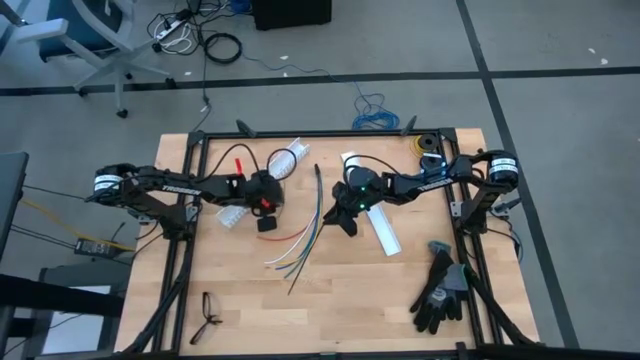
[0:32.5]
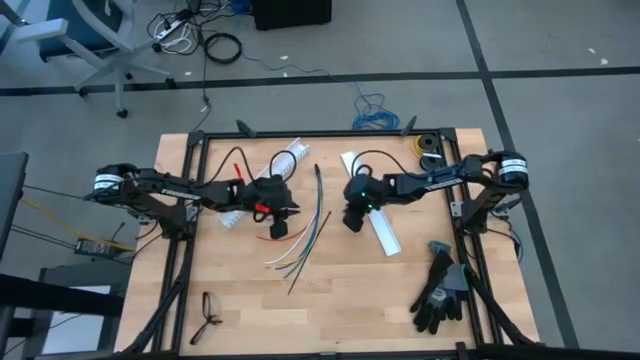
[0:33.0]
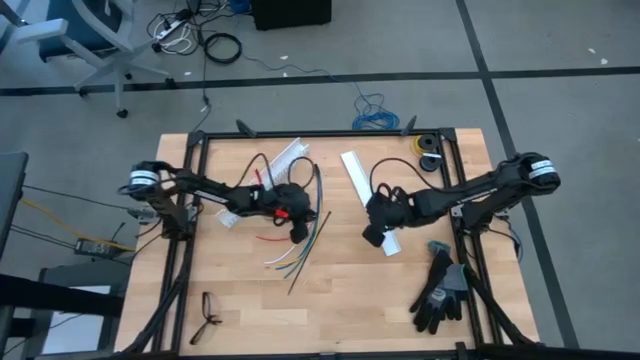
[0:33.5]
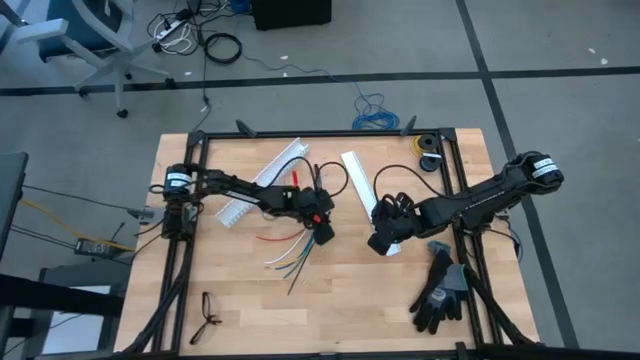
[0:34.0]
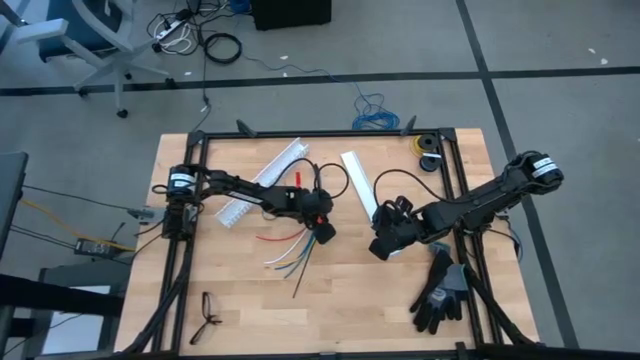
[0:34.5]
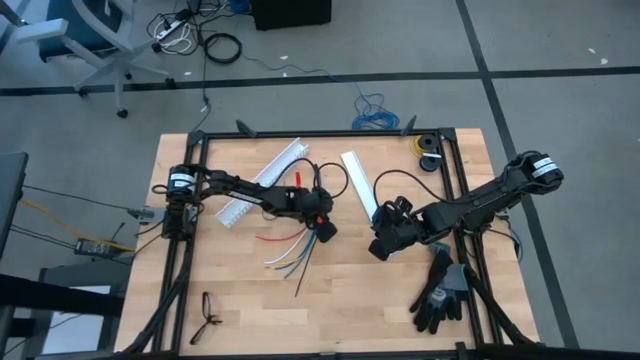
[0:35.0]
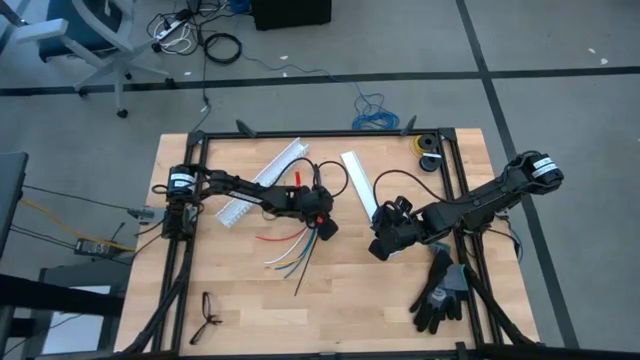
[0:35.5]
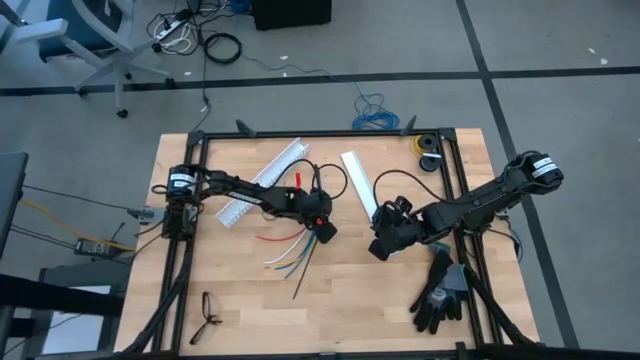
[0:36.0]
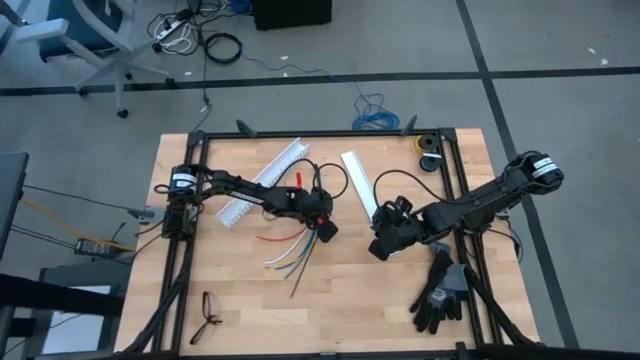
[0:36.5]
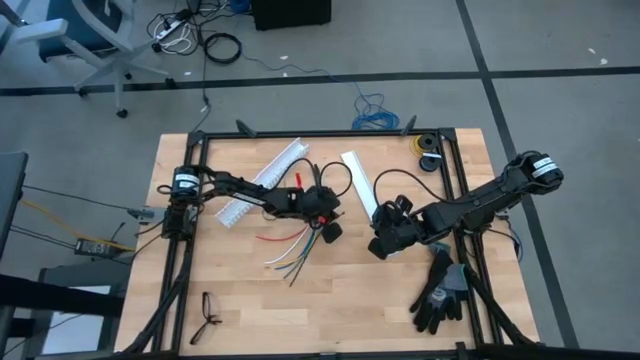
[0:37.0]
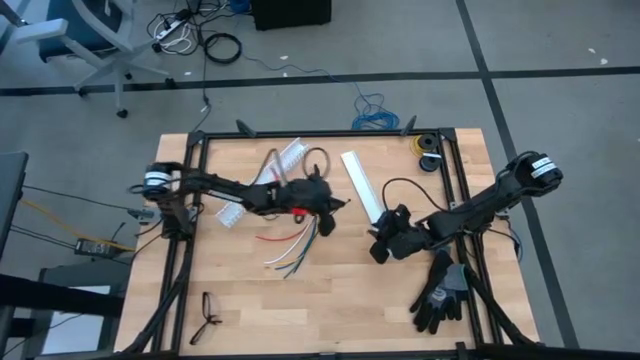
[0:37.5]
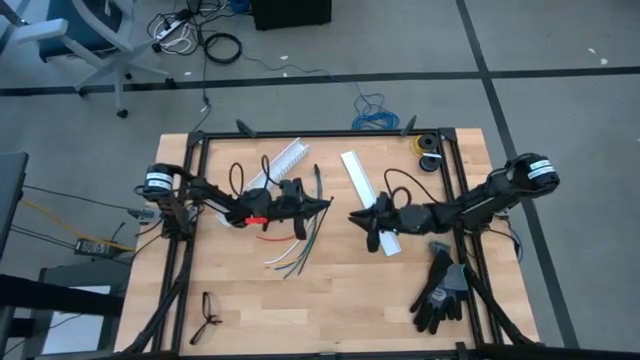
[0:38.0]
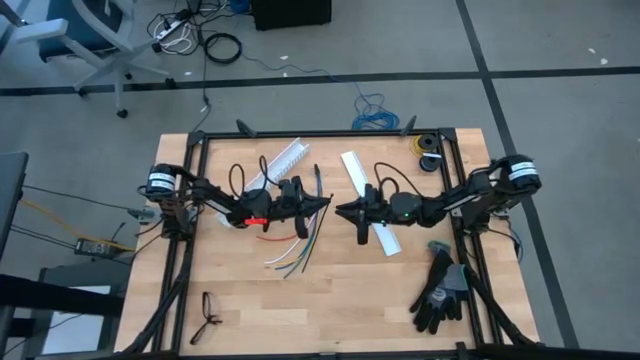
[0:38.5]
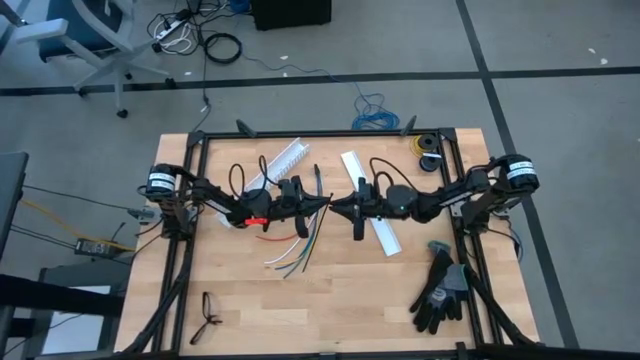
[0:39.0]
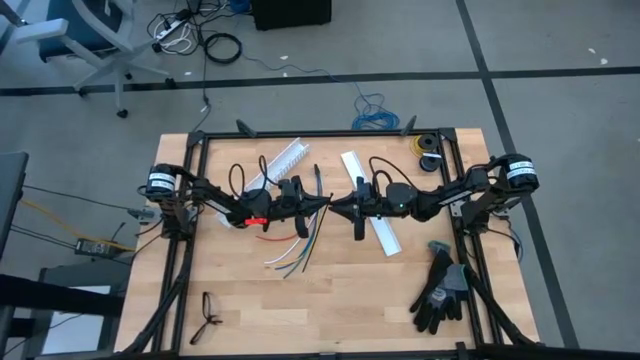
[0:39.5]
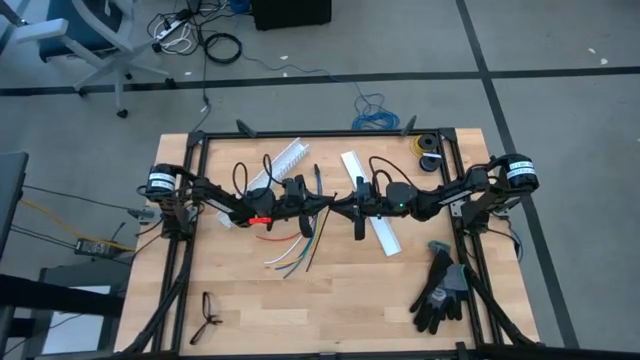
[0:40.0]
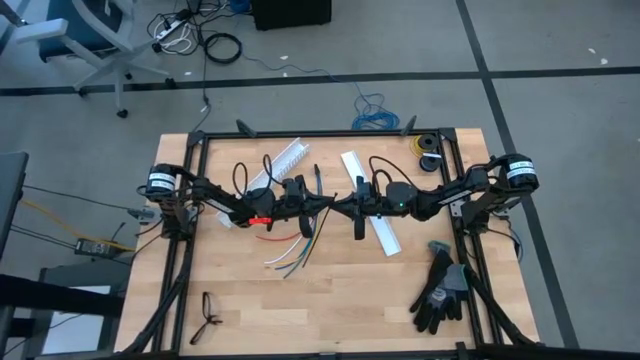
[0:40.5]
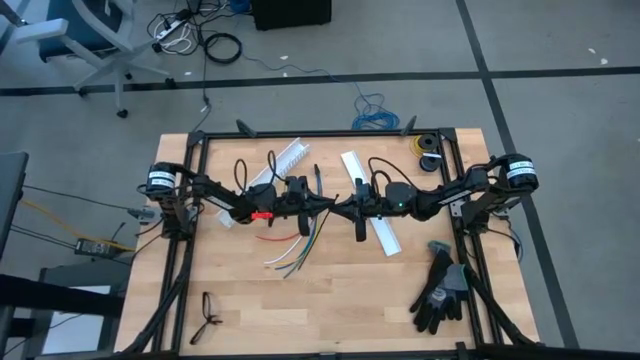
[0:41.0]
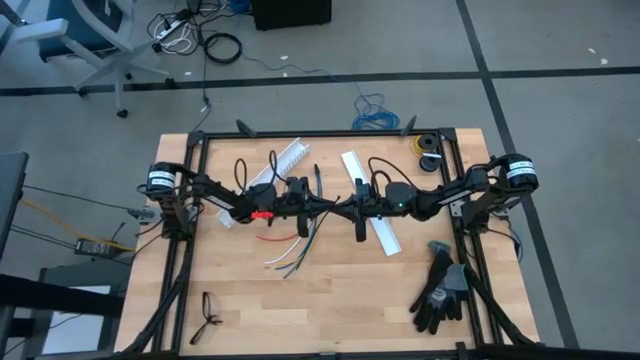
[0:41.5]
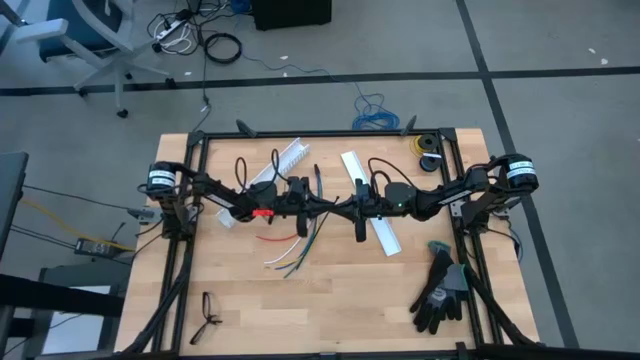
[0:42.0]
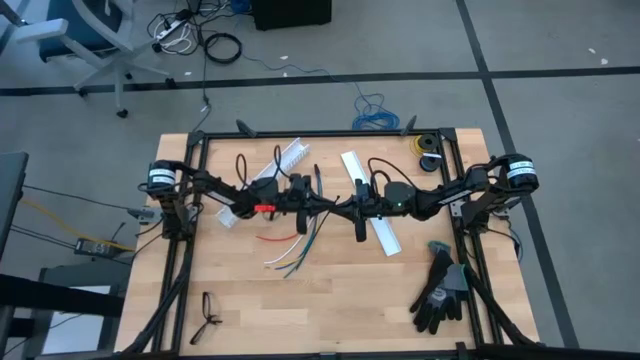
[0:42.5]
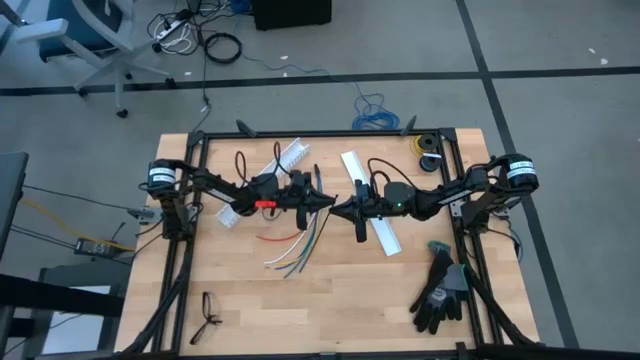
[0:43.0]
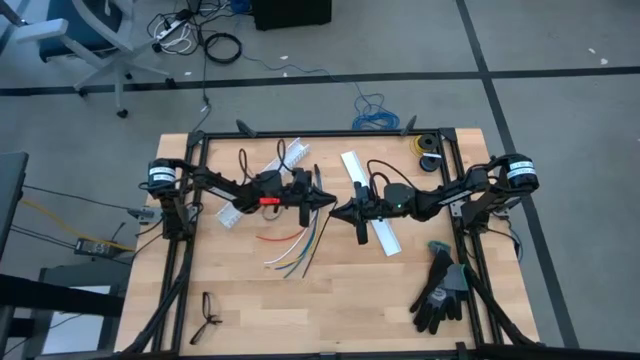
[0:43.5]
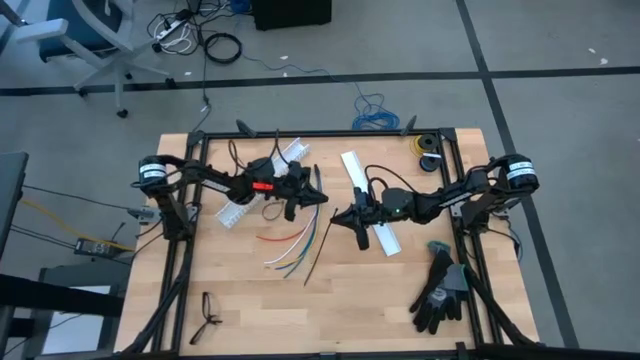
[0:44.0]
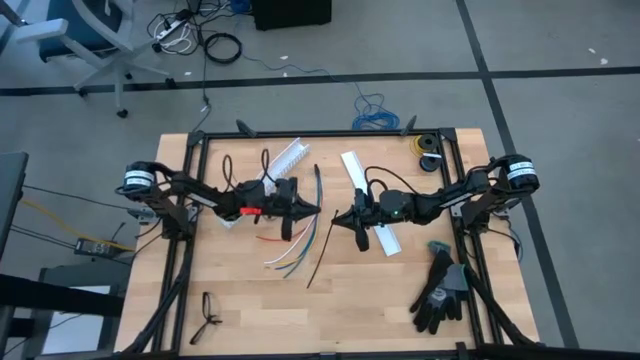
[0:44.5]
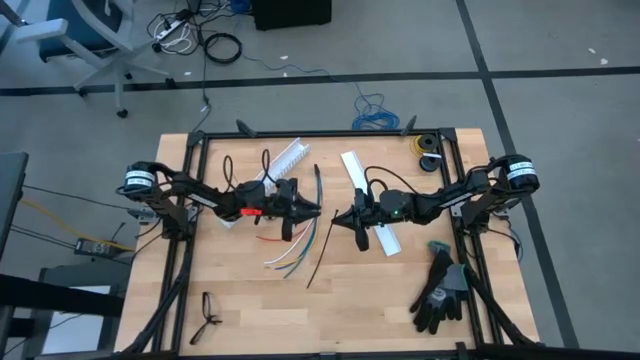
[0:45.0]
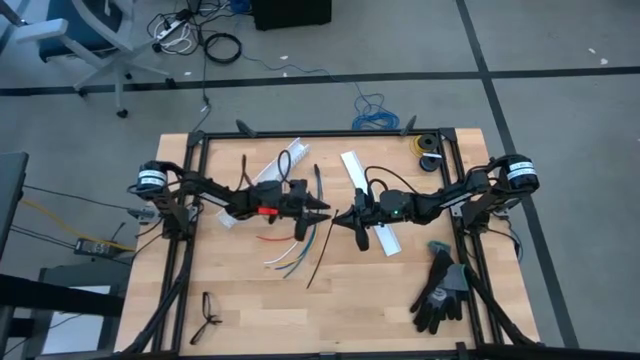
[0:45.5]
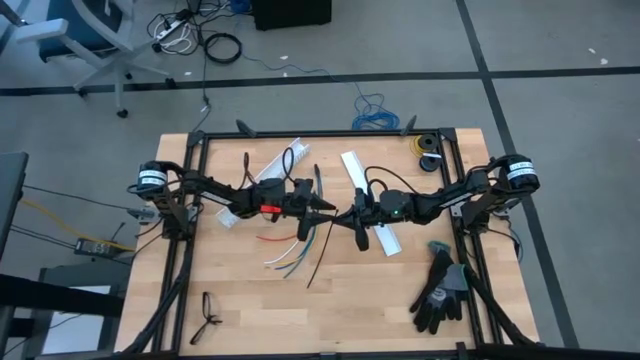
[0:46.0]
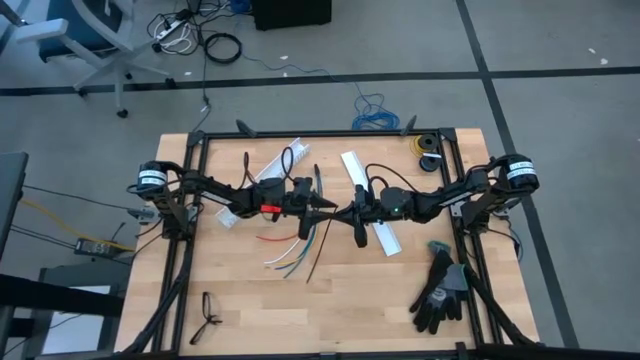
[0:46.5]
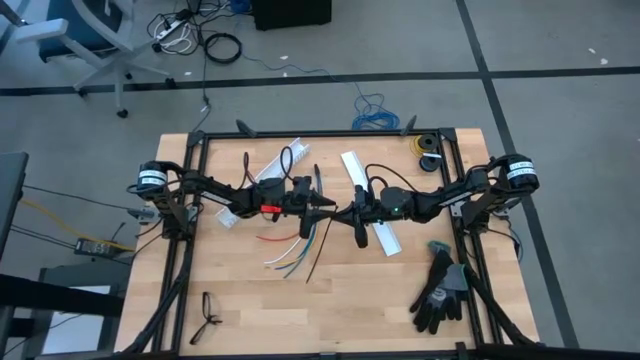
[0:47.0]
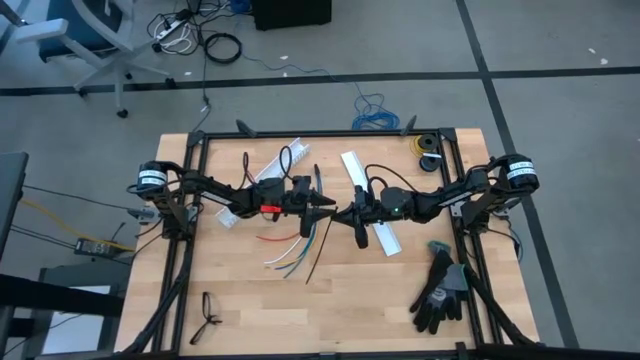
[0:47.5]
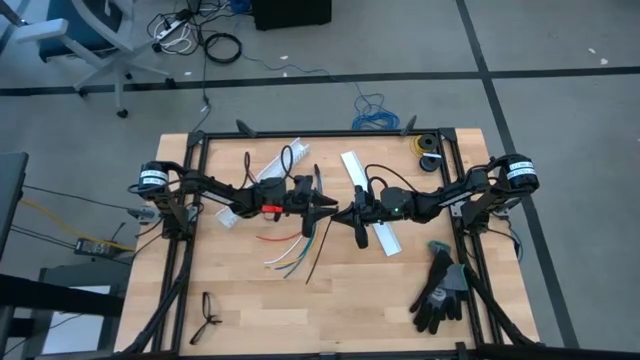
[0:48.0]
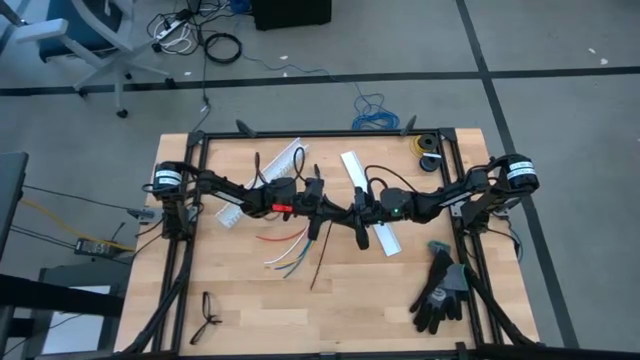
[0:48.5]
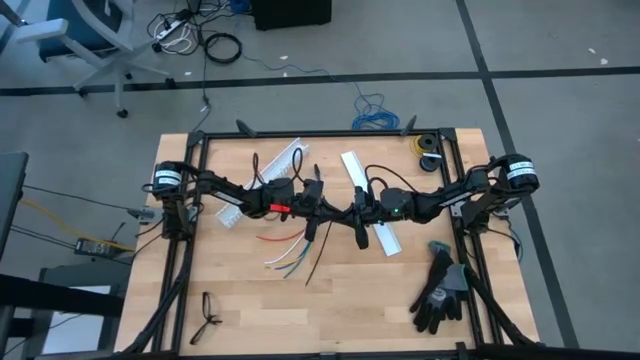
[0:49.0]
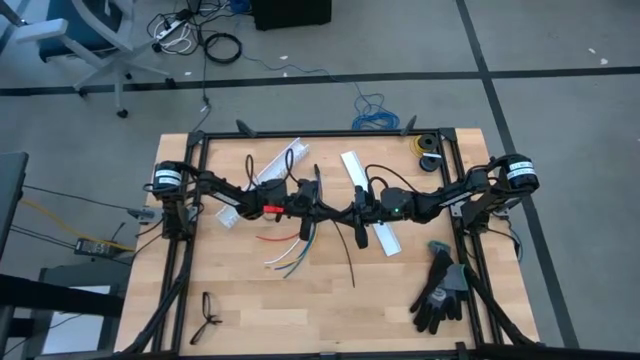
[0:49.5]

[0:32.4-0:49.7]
Task: Ziptie cables
Prepare the black zip tie to wrap the cable wires
